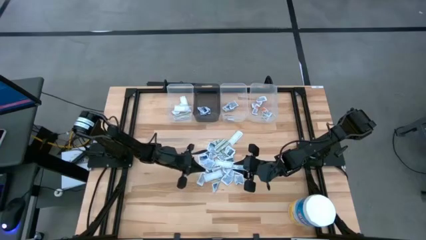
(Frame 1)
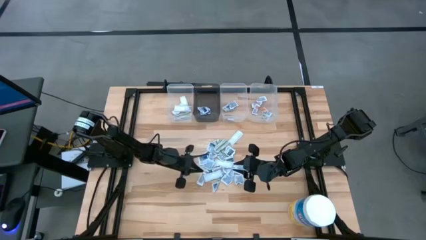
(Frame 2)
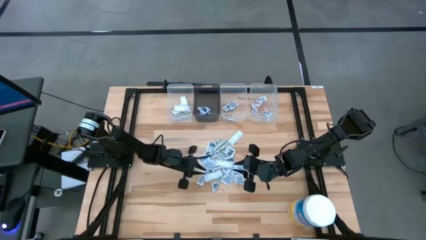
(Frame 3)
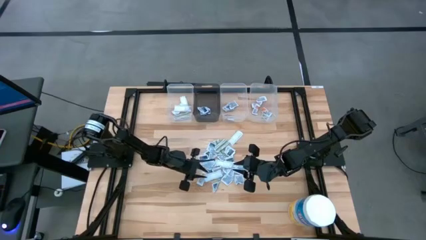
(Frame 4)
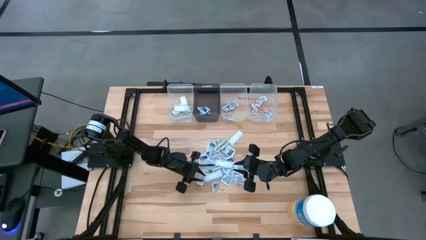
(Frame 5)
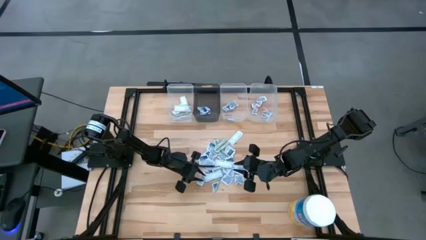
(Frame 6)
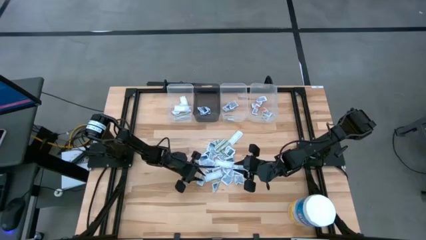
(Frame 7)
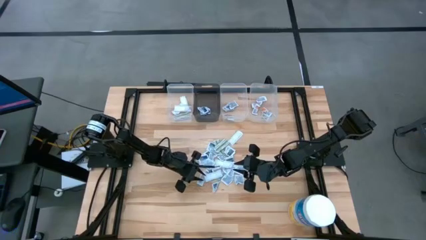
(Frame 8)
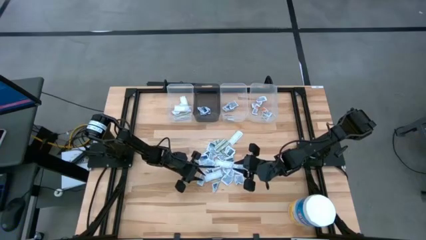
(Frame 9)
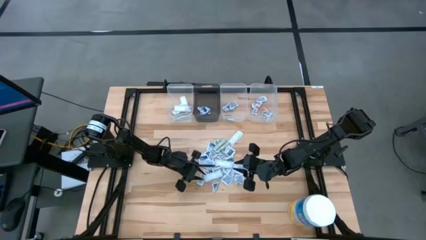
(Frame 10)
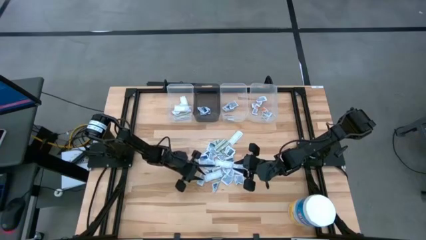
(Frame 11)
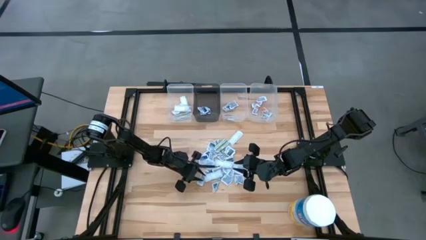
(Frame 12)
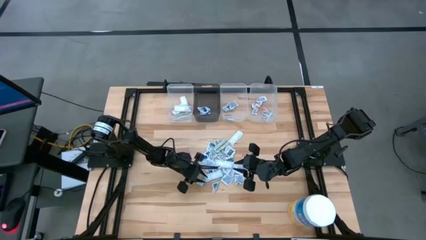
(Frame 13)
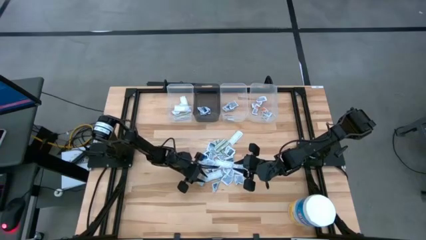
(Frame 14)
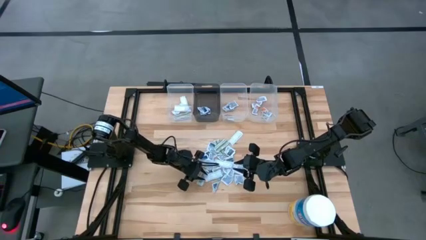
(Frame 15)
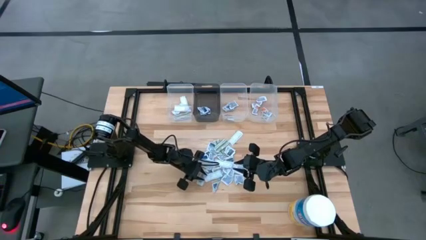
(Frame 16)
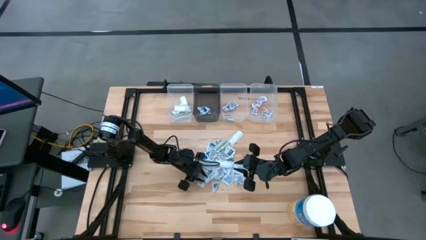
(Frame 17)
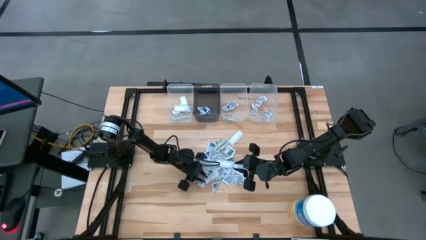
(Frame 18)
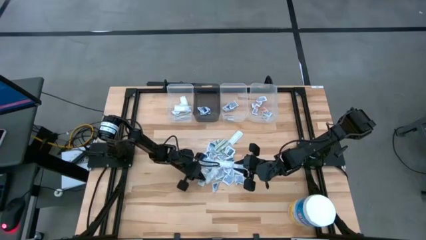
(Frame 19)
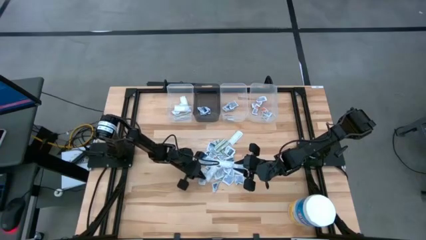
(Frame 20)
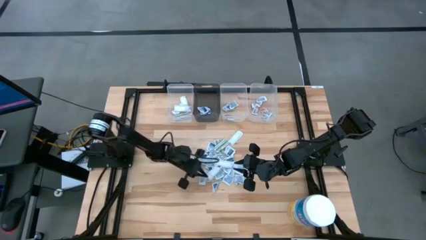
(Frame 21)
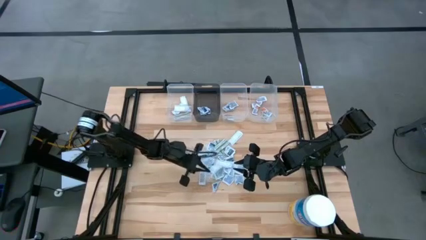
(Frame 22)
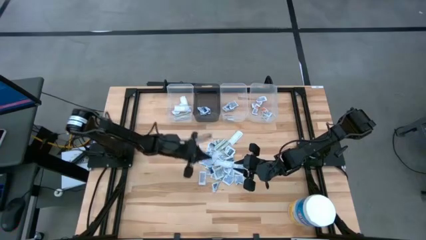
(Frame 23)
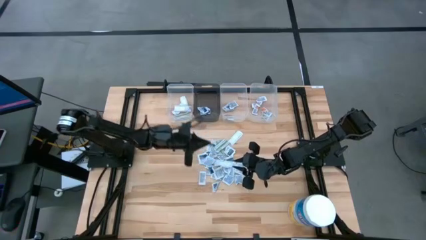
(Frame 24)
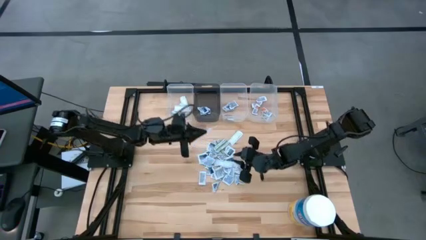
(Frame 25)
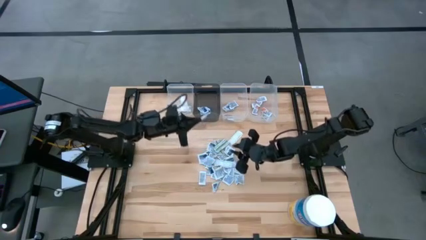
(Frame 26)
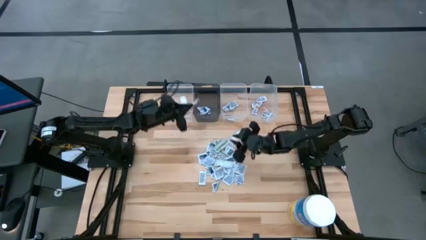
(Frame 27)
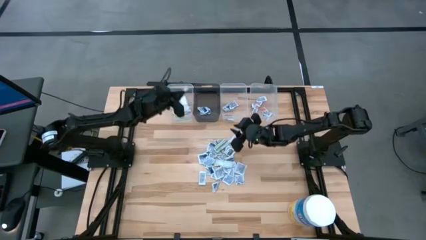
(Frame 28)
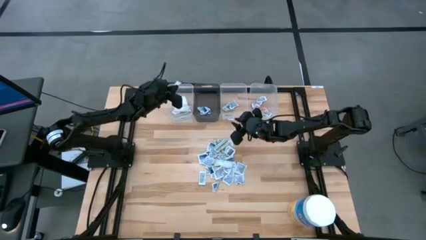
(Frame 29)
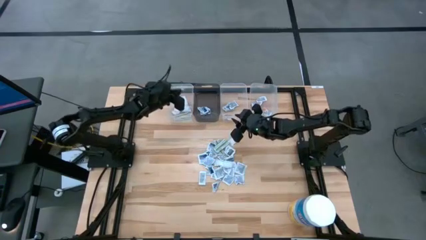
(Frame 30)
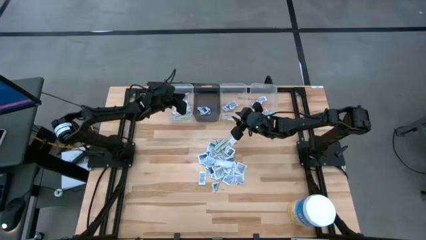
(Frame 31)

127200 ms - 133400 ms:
Task: Pick & Place First Aid Supplies
Put the bandage into the left transparent bin

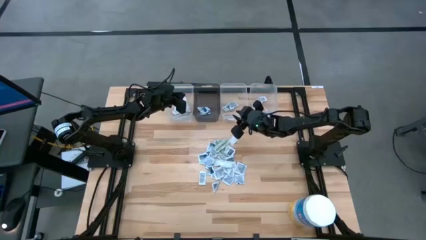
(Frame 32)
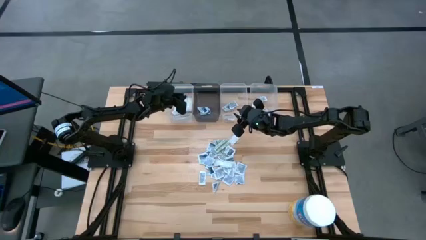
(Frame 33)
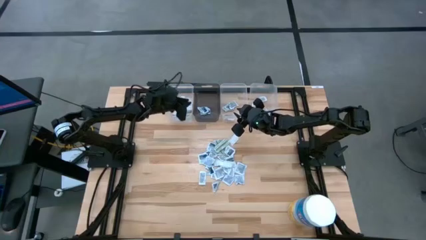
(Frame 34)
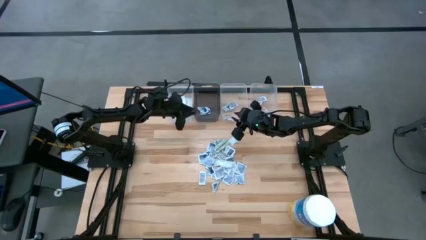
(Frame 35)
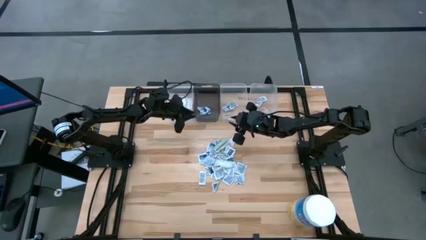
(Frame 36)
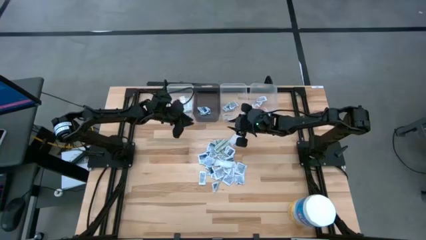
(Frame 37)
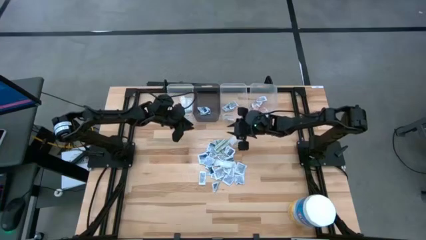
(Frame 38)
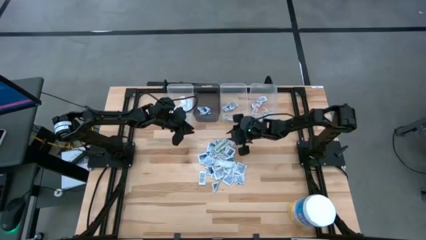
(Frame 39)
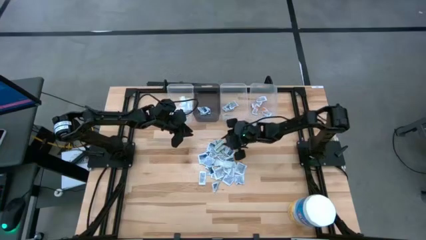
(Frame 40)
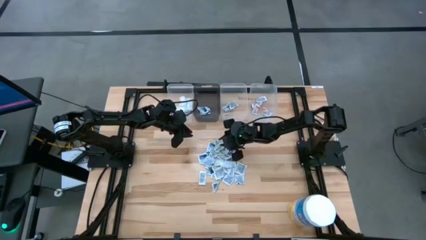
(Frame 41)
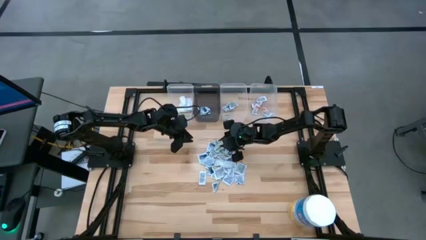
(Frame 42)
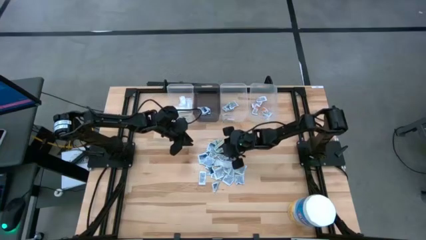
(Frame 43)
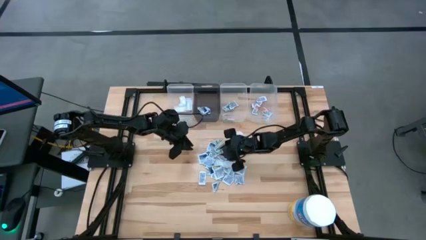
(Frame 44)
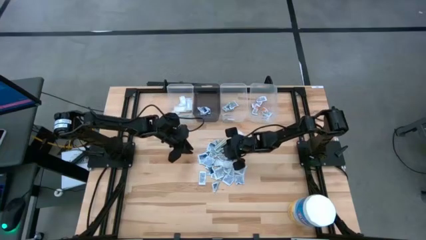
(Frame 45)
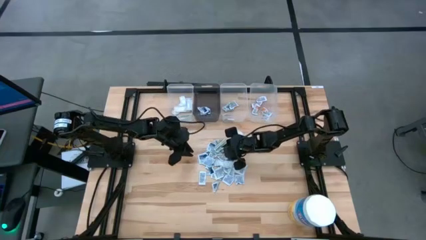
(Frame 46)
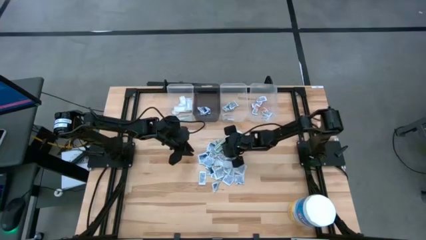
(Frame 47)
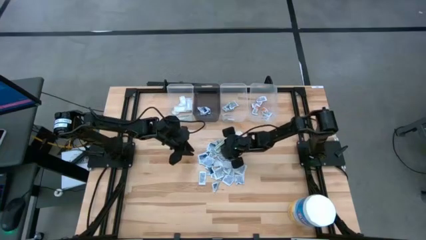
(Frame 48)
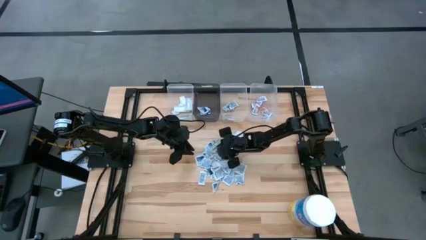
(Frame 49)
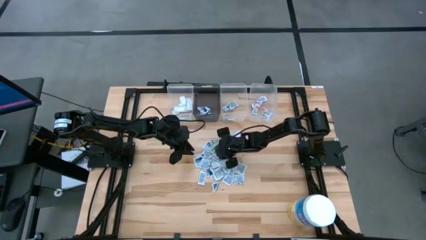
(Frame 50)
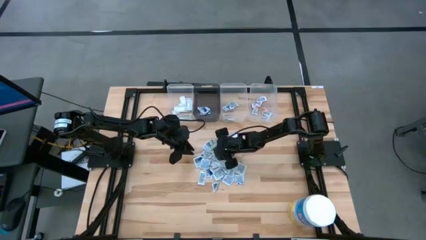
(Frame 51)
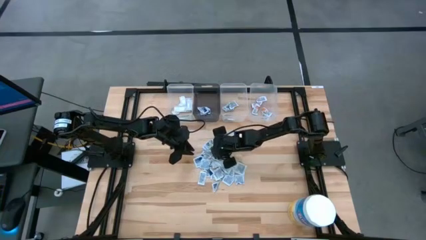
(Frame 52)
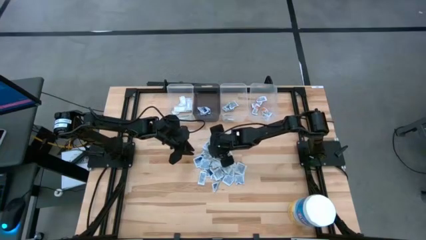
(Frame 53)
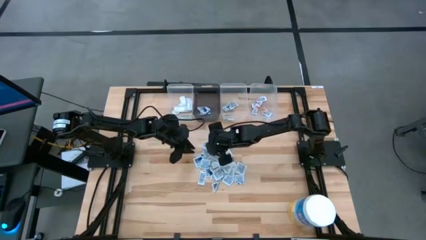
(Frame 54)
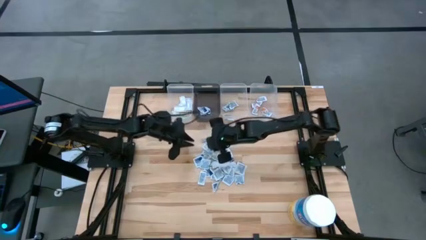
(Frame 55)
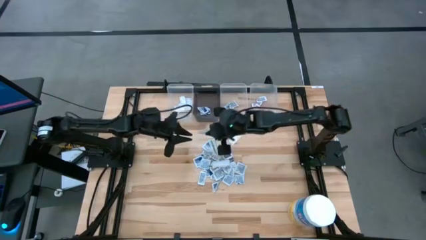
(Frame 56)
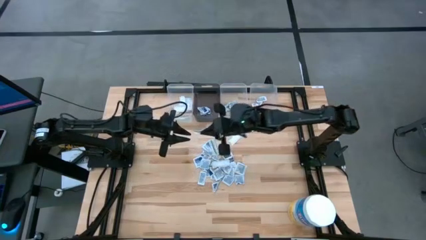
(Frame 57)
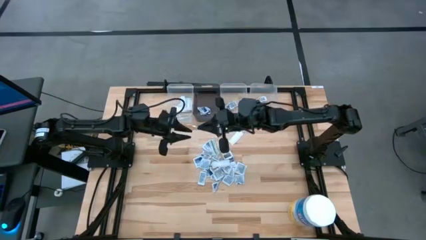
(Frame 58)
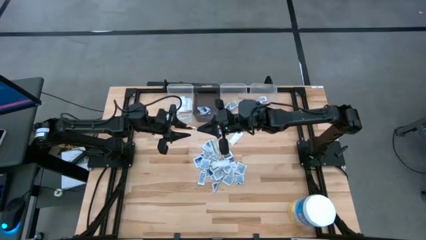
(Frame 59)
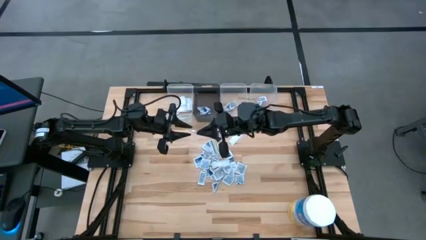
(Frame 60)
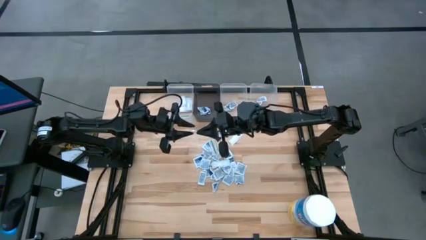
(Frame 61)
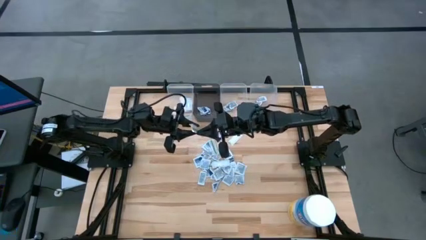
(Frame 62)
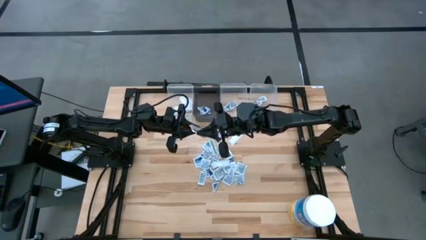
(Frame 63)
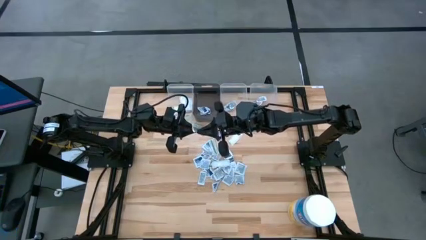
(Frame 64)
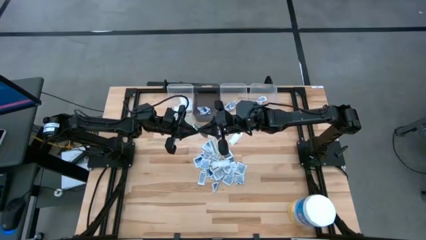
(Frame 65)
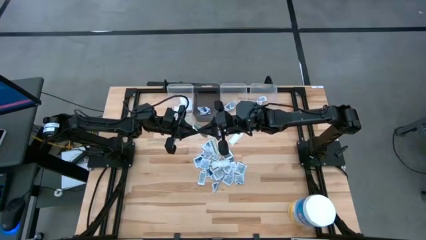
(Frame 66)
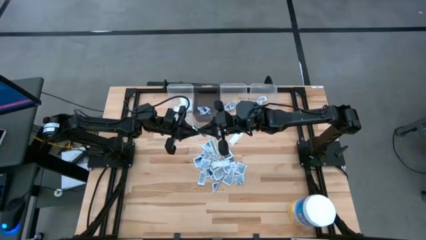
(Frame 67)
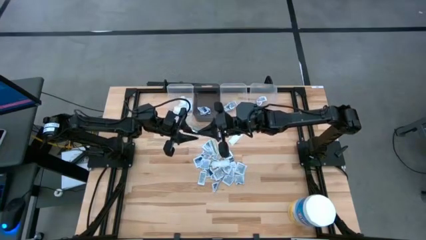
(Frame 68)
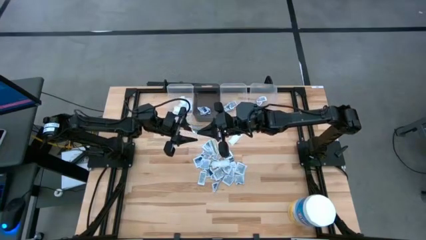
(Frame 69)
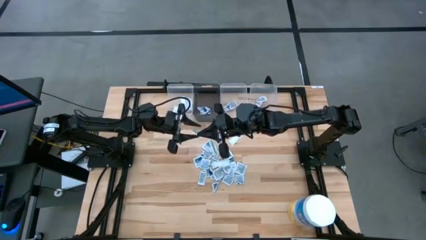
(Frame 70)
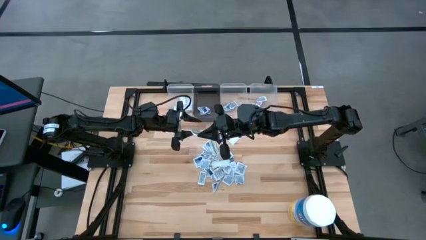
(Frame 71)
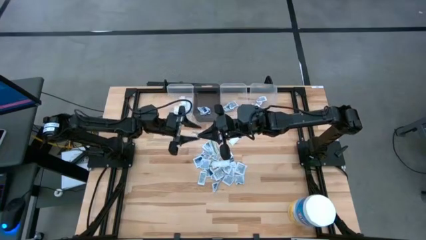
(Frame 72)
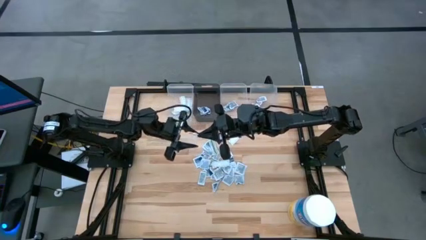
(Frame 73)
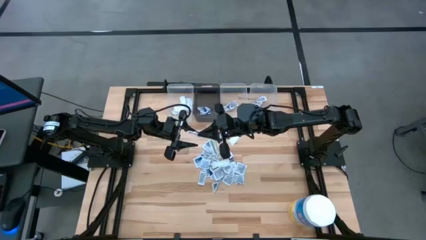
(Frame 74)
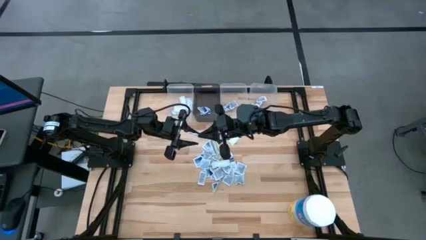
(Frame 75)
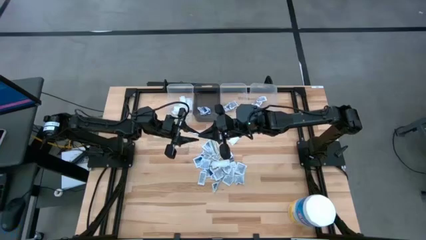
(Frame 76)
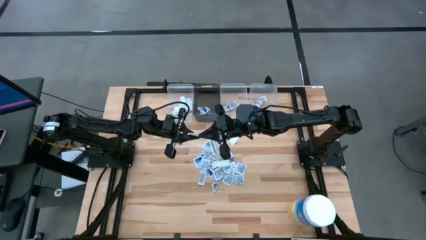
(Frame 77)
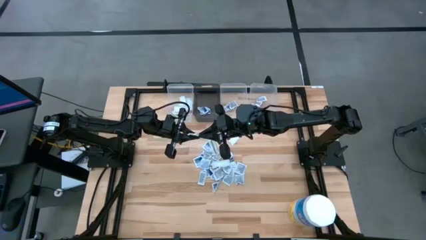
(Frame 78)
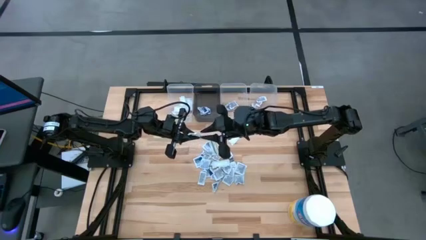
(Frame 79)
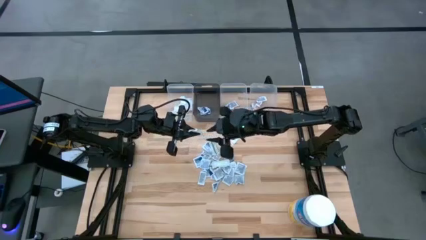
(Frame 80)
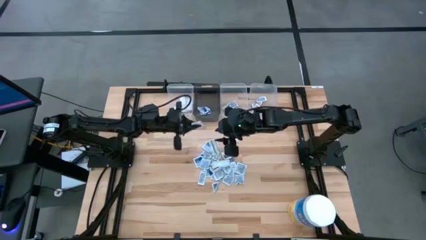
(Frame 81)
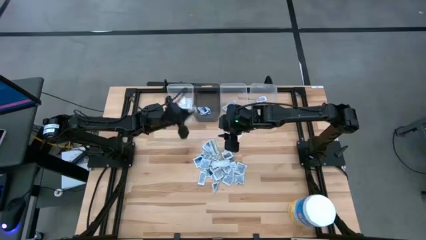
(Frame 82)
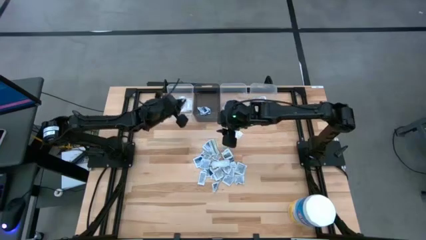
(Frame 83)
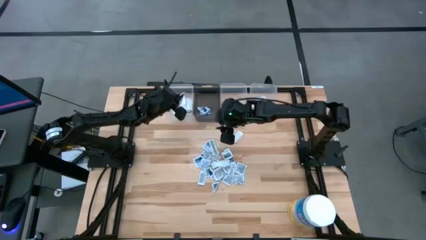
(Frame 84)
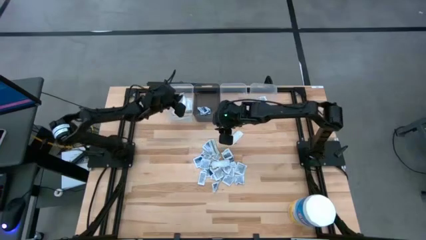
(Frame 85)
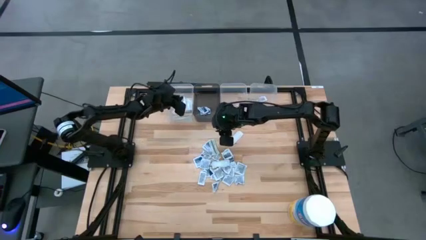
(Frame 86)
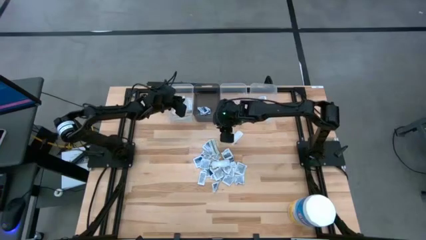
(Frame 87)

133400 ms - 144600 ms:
Put the bandage into the left transparent bin
